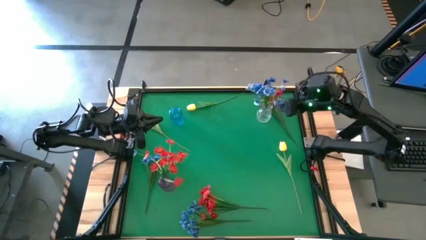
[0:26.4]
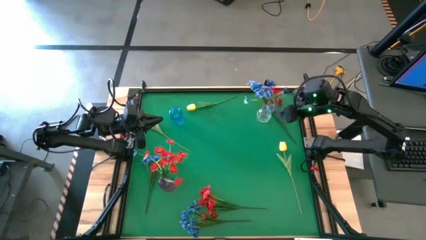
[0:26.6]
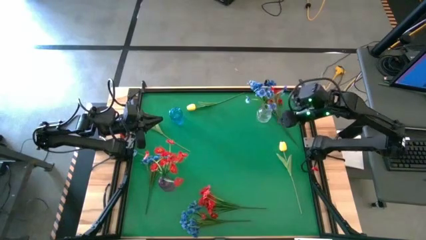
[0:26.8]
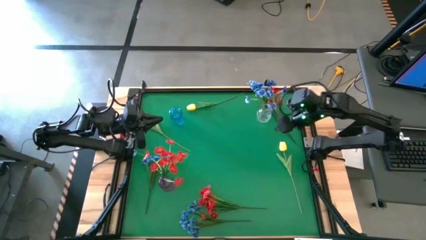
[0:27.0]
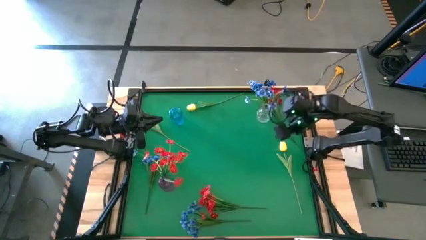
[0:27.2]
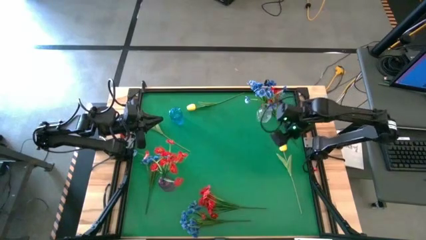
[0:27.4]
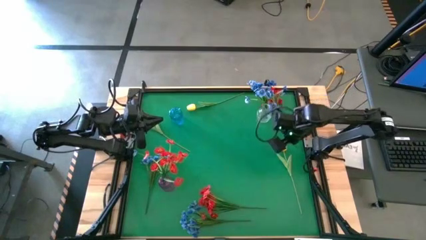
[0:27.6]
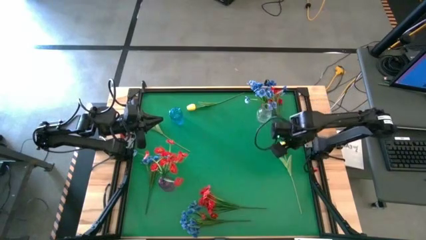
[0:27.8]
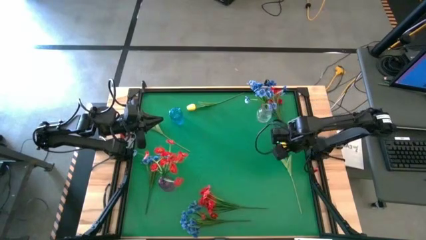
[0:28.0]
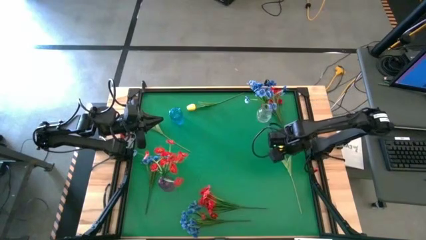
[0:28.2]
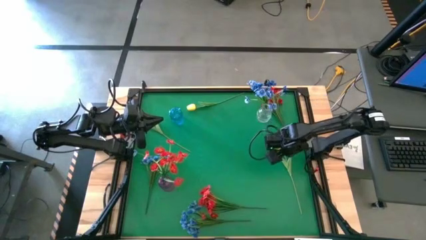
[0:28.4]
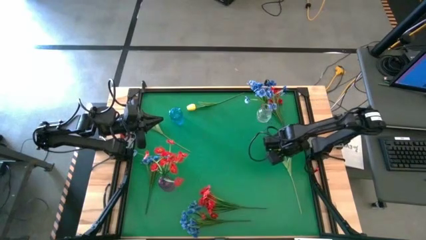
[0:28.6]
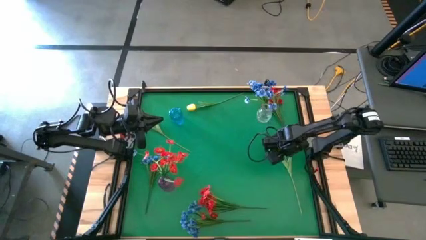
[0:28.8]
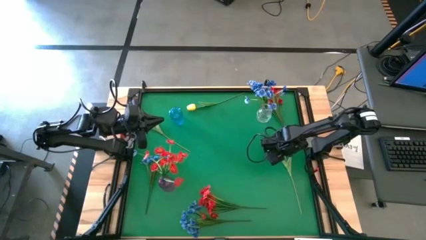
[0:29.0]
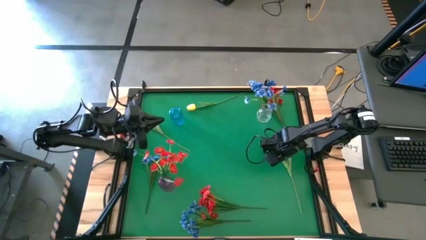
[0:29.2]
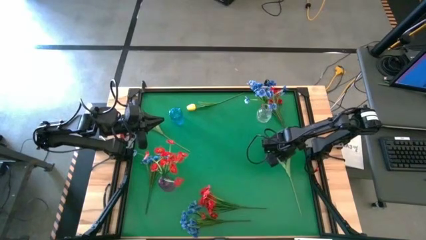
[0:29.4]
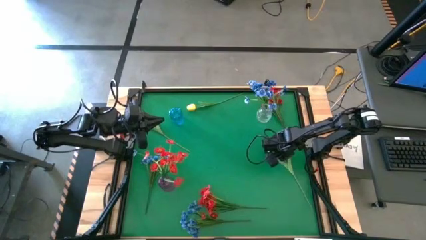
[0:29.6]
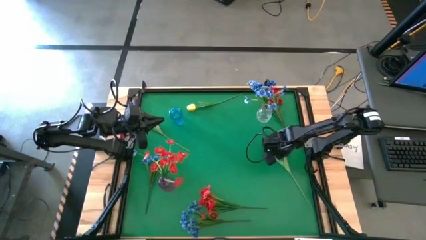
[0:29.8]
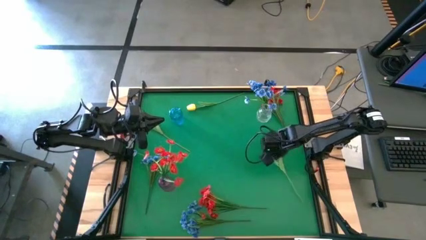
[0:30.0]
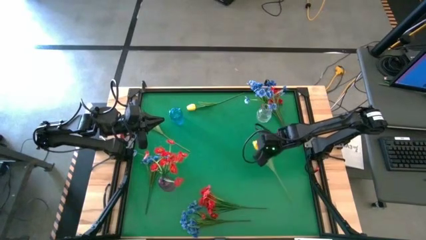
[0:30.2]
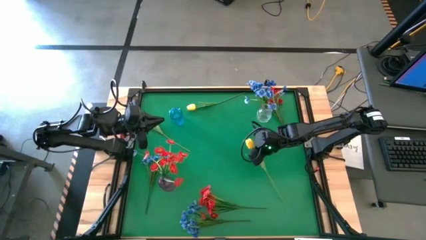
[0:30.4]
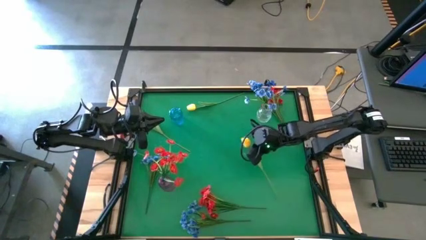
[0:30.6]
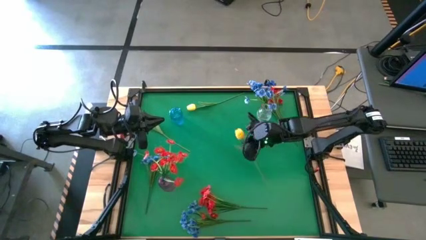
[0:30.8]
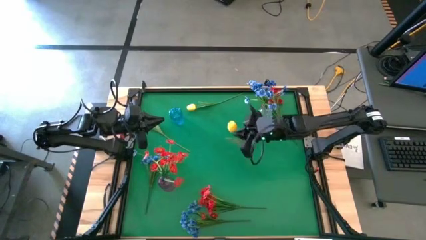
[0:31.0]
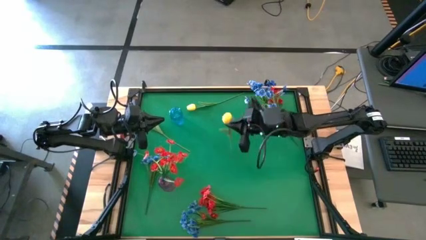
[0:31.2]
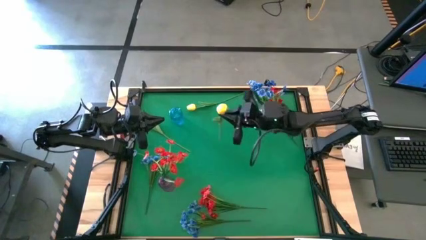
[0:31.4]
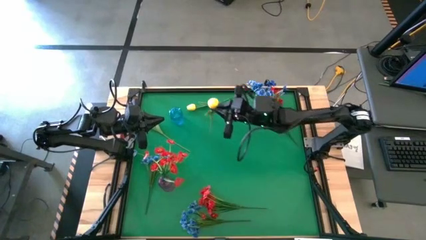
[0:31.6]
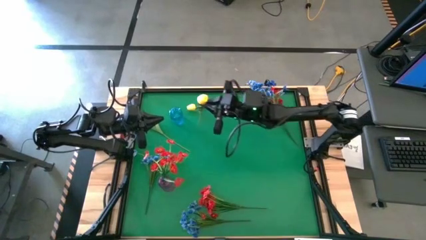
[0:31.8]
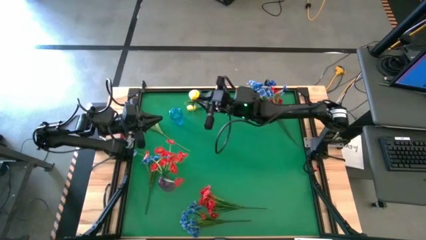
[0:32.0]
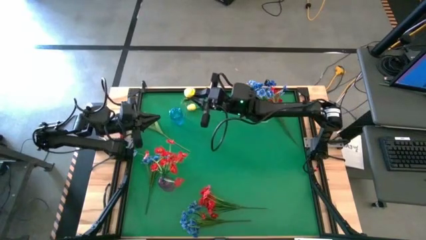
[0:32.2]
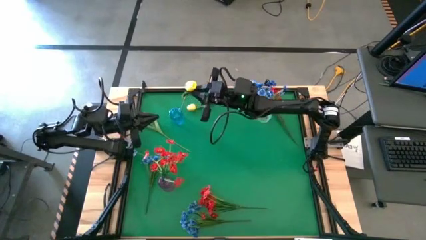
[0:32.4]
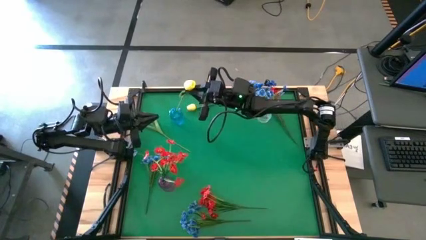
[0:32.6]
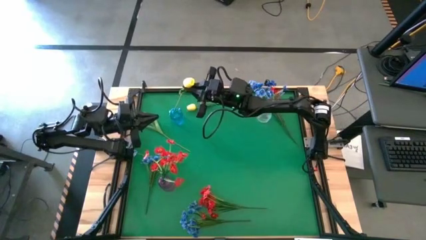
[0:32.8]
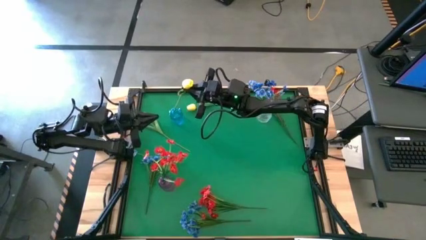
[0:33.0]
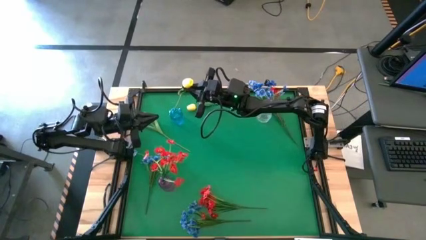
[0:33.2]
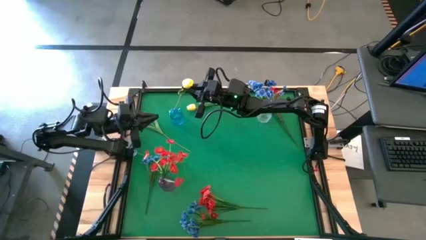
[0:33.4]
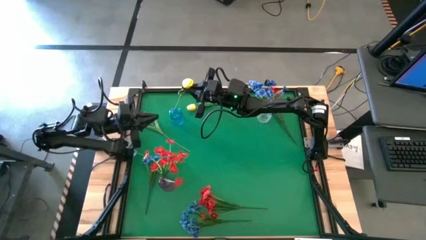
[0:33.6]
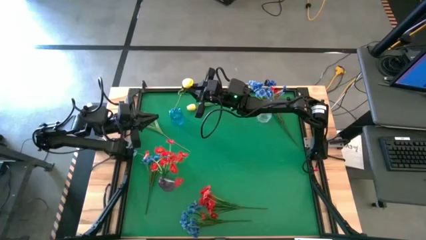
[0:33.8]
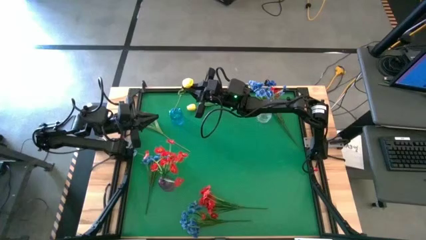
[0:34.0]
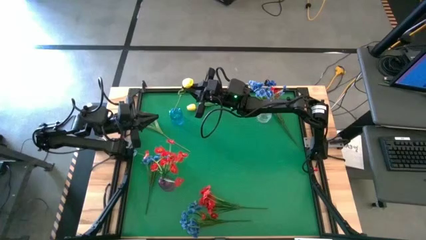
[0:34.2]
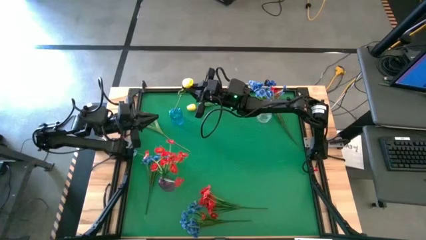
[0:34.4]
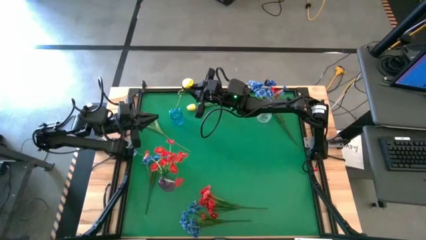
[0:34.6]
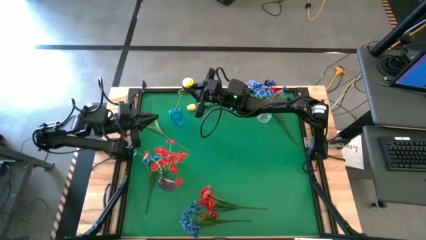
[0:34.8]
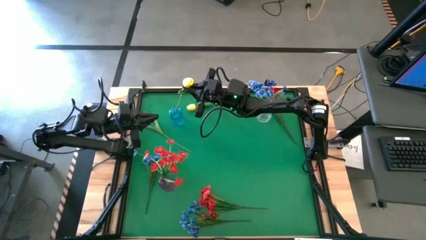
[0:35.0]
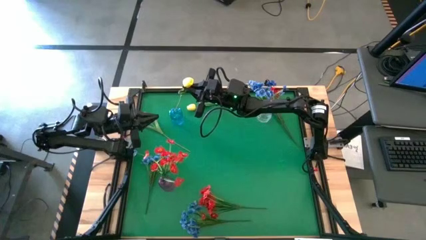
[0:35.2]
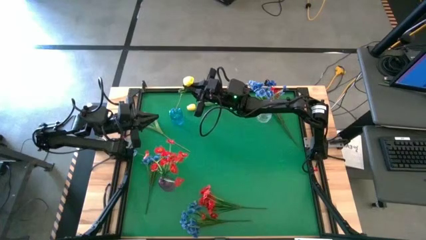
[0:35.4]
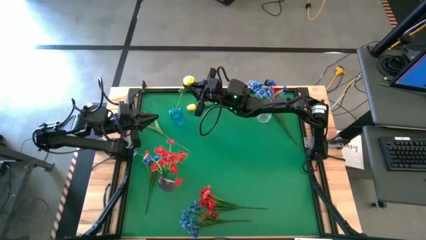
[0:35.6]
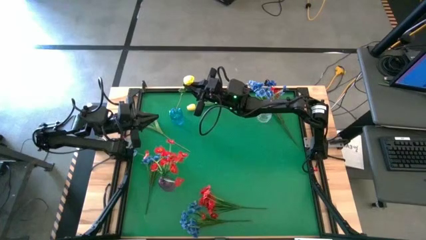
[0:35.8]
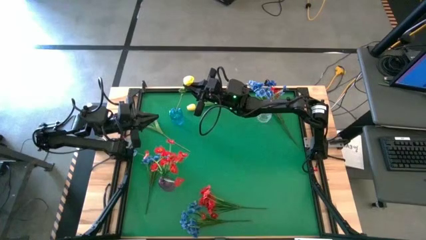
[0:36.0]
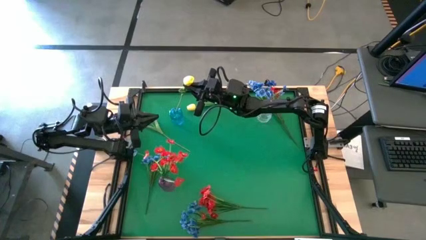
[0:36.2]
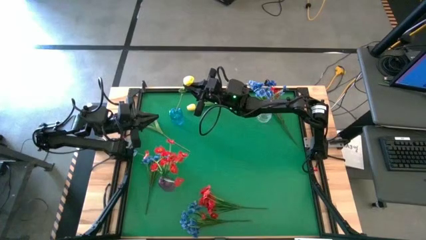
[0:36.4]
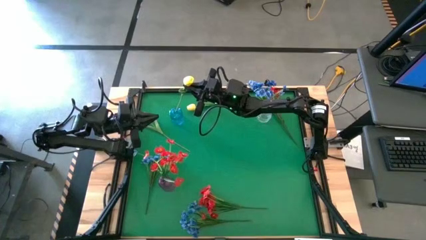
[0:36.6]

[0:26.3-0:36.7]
Task: Sort flowers into vase by color
Put the yellow tulip into the blue vase

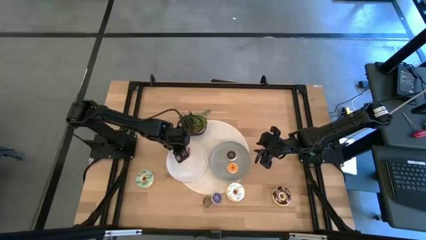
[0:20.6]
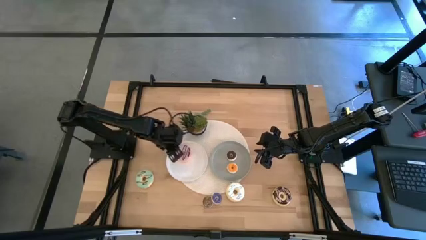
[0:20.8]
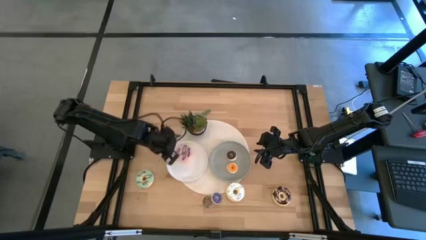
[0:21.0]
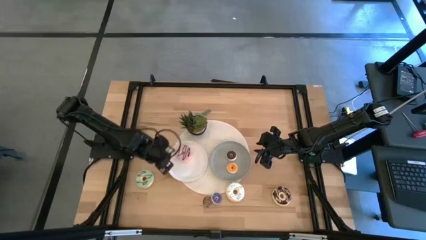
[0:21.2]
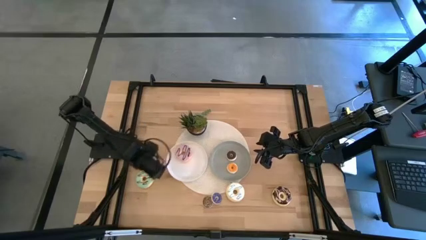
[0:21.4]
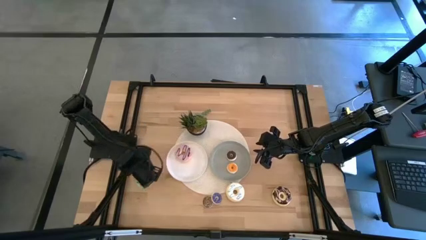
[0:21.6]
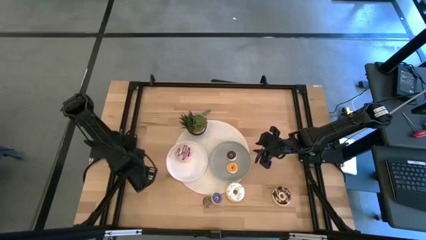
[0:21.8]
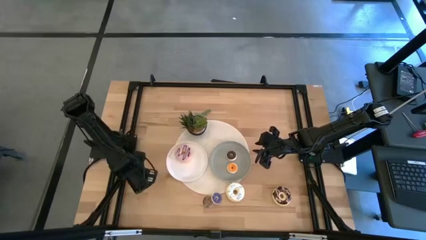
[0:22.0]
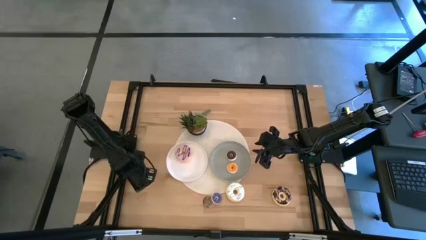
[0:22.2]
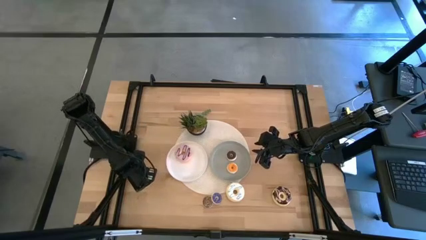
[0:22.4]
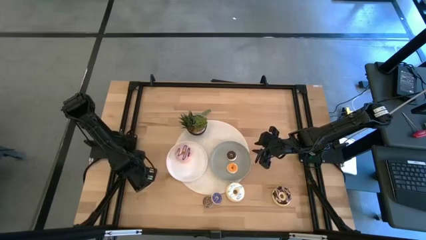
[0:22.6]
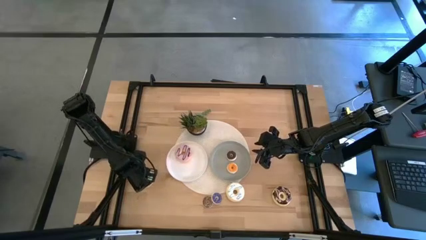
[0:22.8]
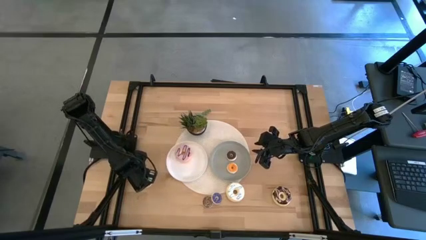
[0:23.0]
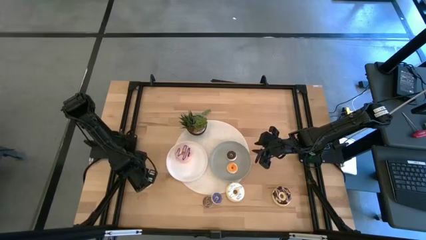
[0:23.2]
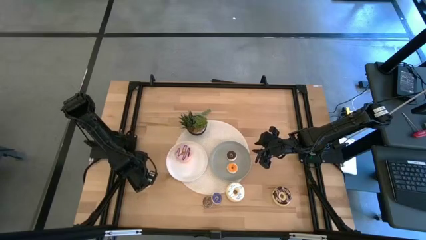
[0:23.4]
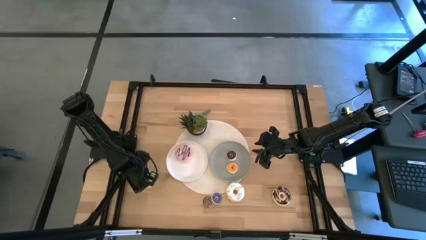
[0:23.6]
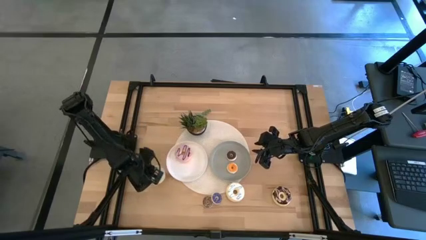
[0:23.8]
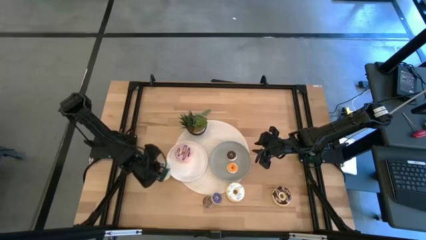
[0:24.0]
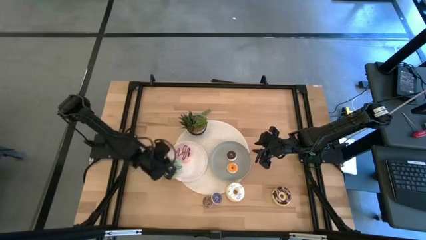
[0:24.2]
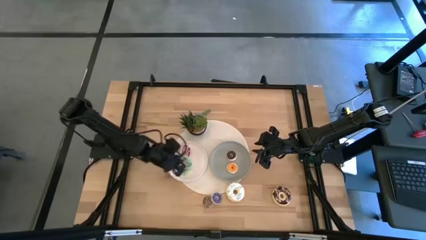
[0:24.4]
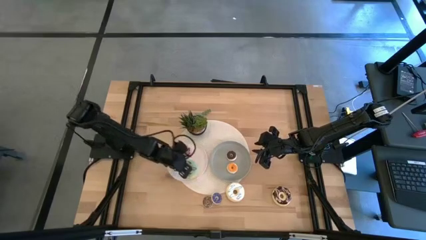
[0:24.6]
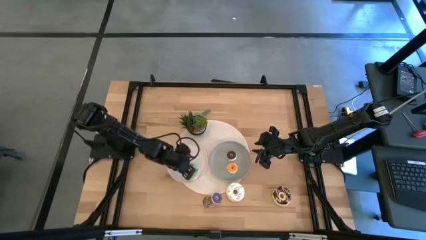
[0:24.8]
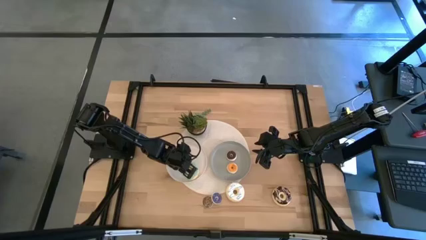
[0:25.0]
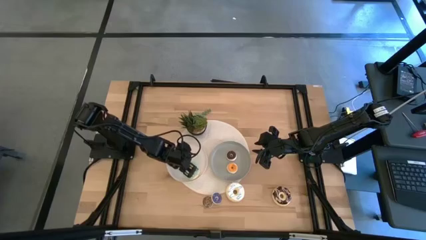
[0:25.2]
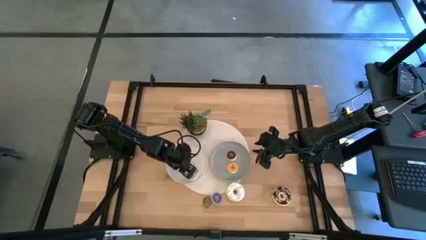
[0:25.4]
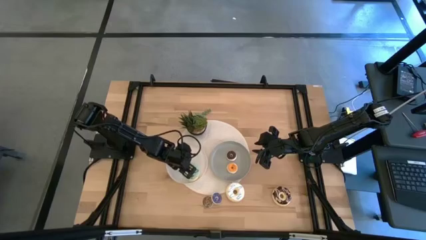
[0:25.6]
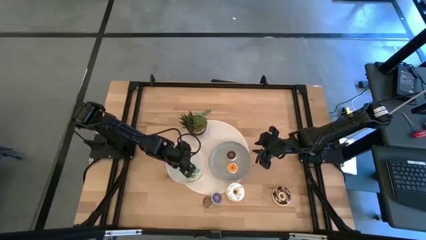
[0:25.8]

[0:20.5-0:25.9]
Task: Pick & Place donuts
Put the big green donut onto the white plate
